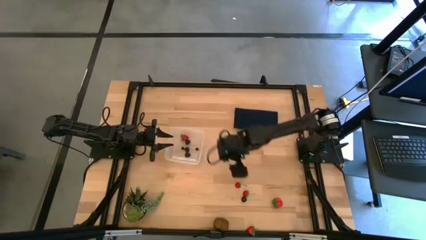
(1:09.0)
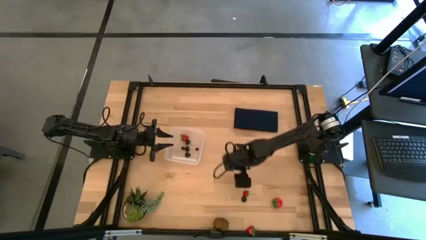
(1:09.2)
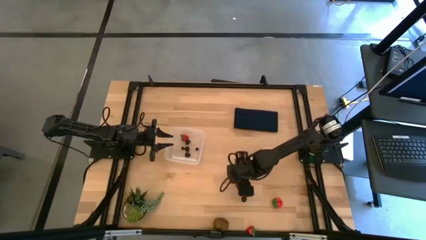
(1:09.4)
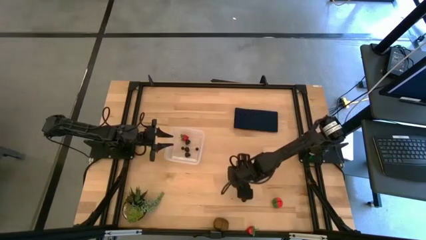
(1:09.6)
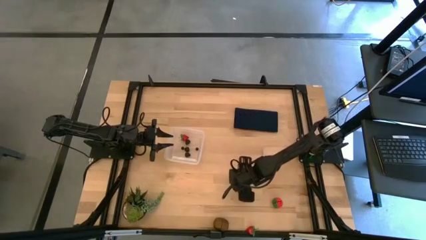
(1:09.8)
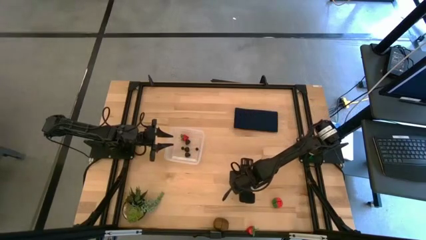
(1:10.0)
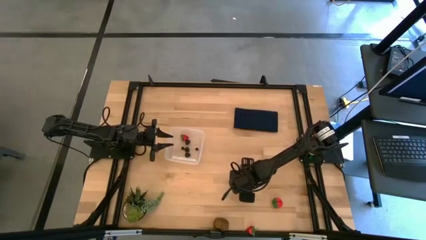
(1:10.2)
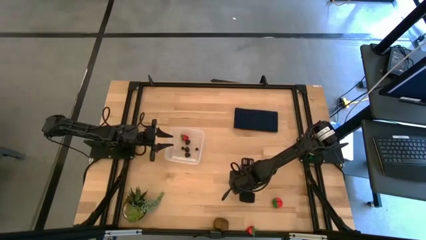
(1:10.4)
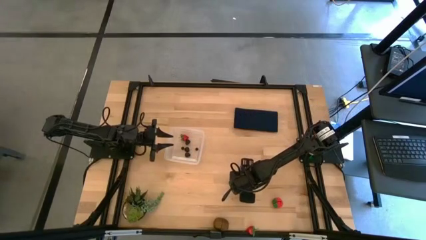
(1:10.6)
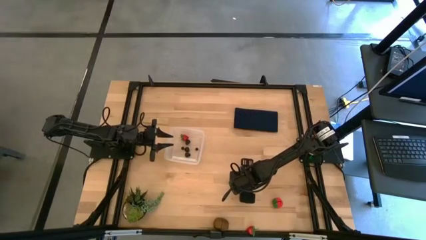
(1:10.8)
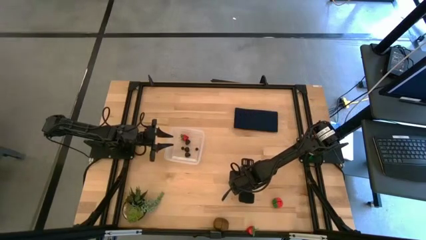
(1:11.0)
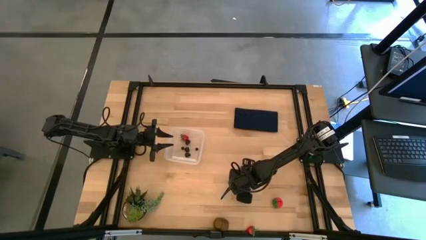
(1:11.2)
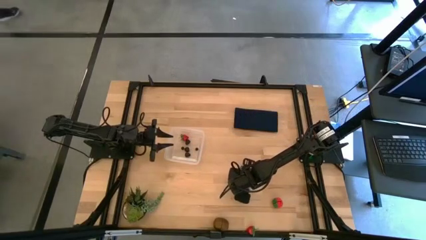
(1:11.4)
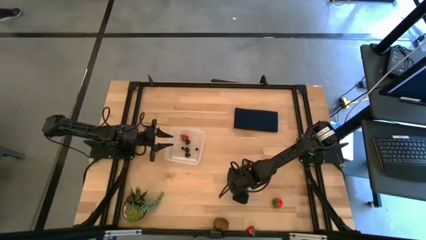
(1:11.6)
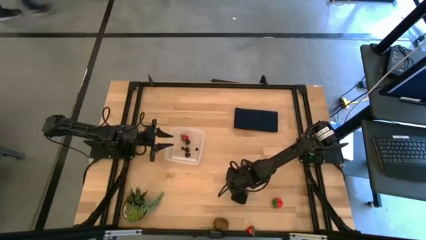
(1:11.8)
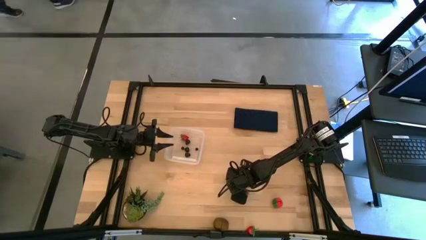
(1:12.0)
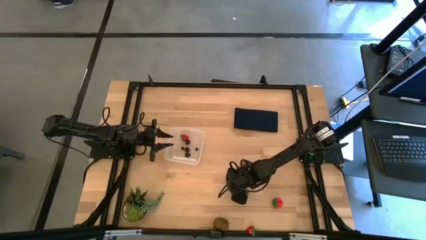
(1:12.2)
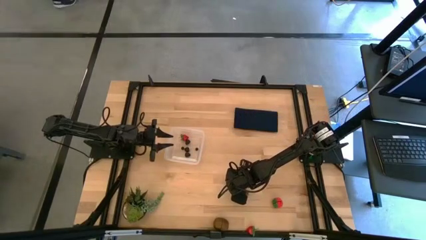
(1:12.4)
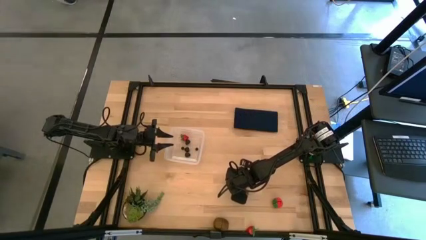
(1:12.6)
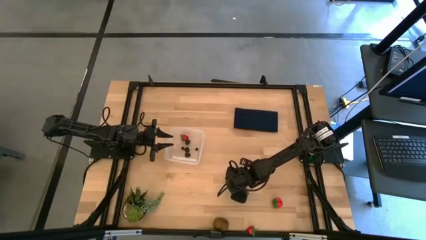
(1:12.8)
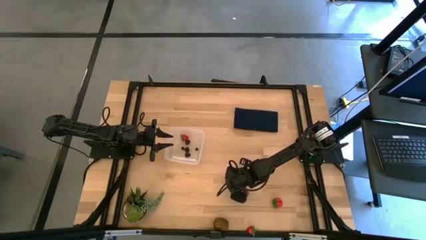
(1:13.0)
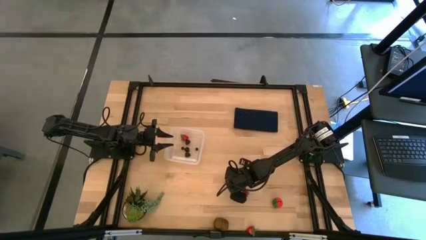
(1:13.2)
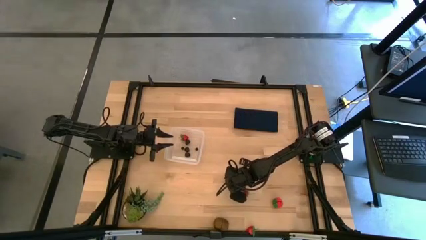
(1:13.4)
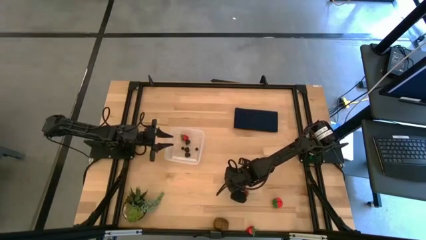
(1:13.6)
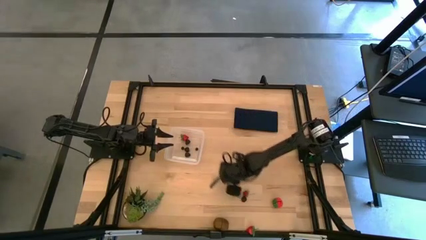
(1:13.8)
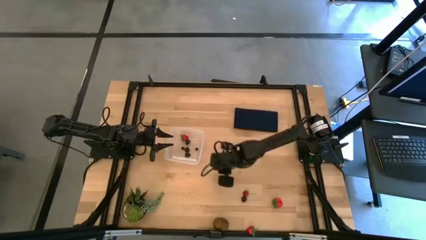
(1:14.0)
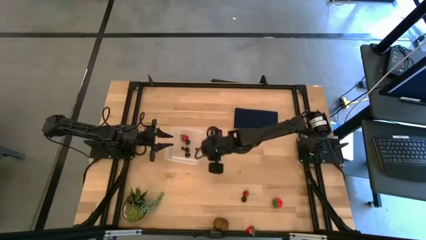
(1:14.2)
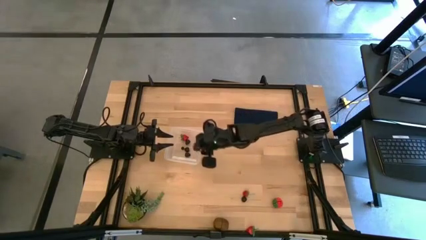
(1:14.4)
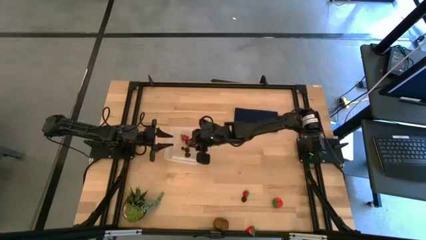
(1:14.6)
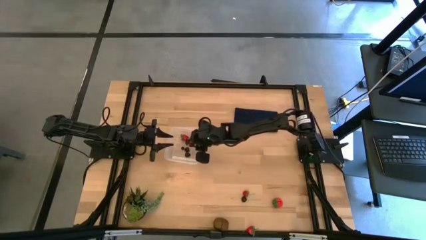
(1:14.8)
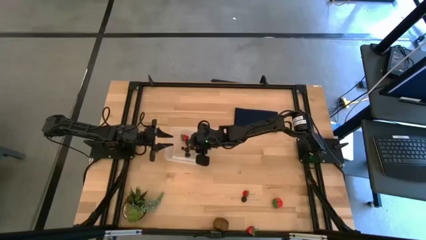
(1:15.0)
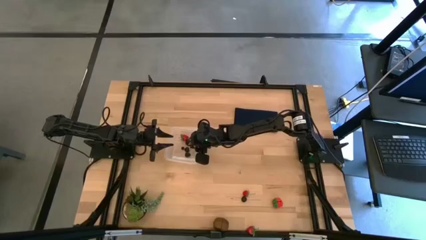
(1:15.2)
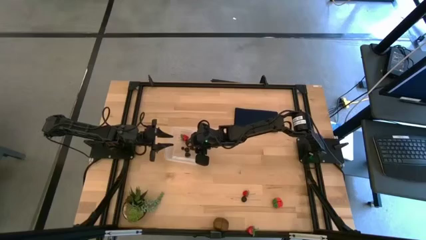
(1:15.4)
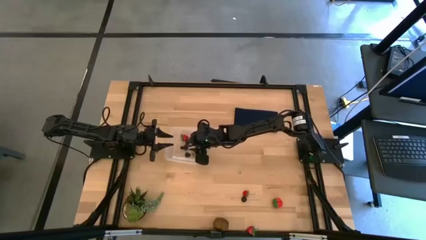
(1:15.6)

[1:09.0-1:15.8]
Task: Pick and placing Produce into tupperware
Put the top strawberry into the transparent bin

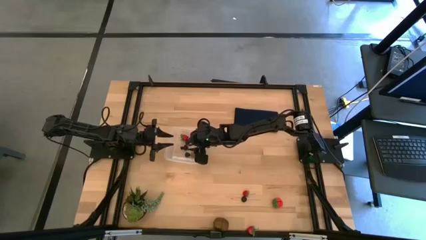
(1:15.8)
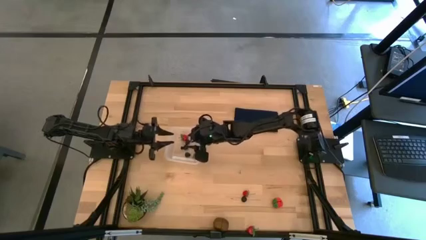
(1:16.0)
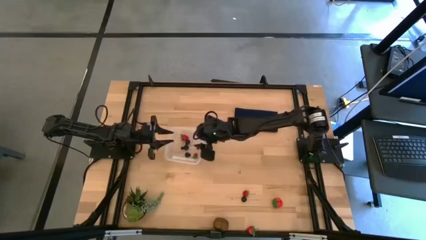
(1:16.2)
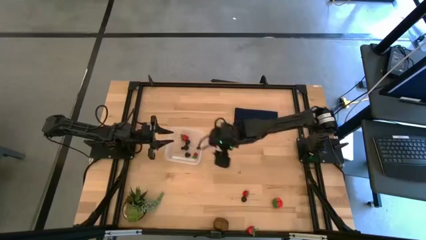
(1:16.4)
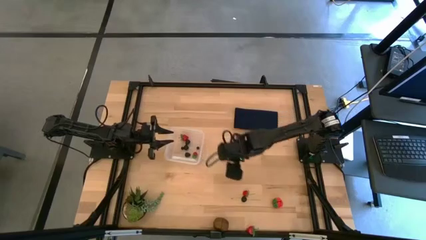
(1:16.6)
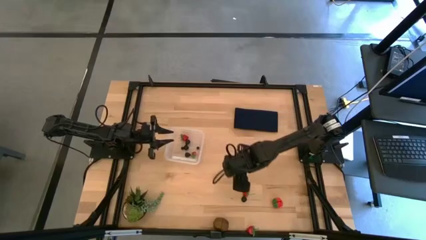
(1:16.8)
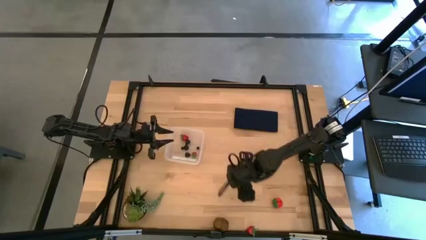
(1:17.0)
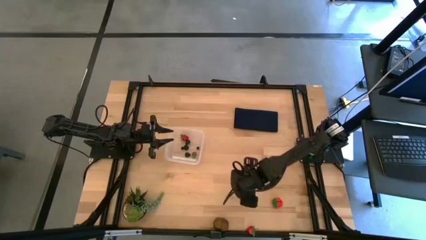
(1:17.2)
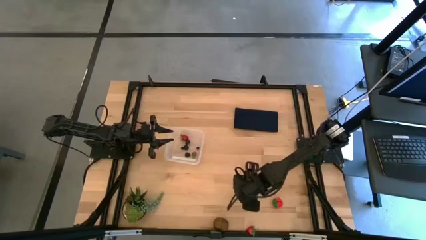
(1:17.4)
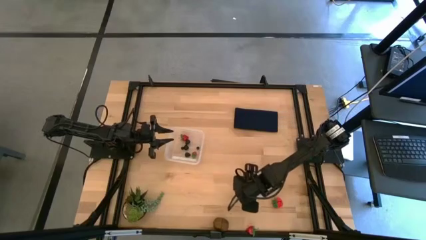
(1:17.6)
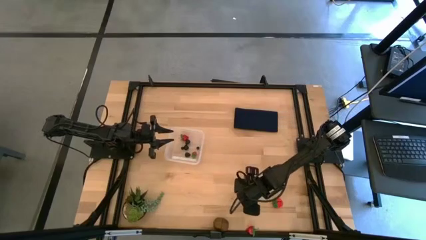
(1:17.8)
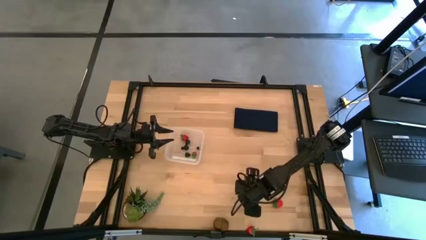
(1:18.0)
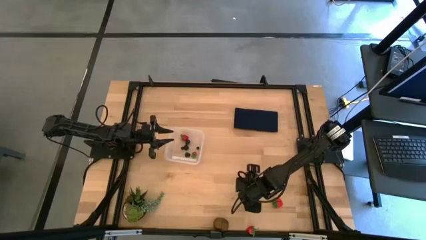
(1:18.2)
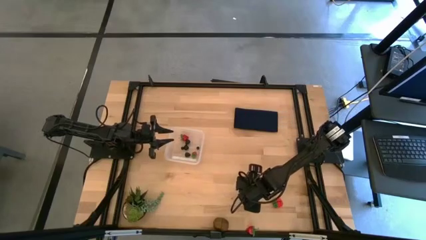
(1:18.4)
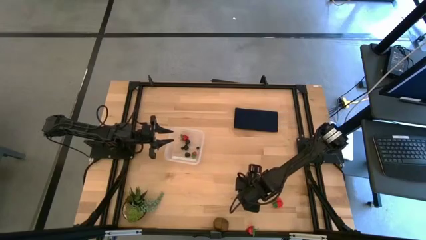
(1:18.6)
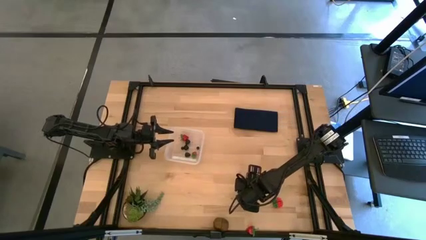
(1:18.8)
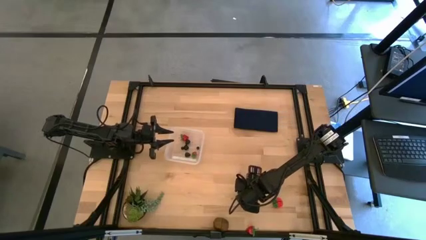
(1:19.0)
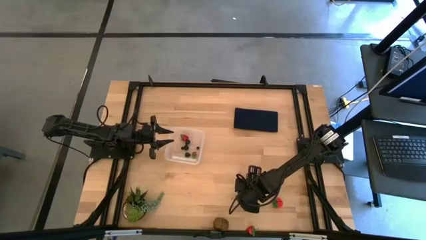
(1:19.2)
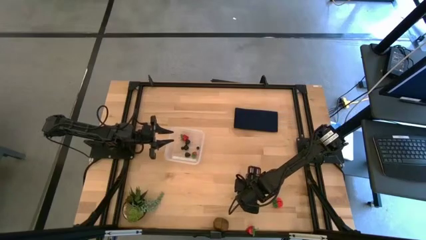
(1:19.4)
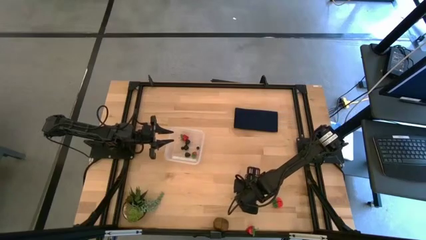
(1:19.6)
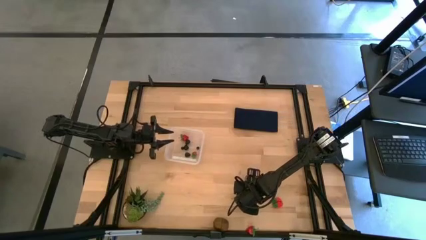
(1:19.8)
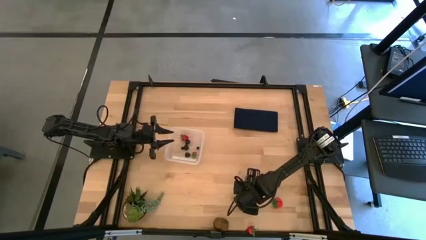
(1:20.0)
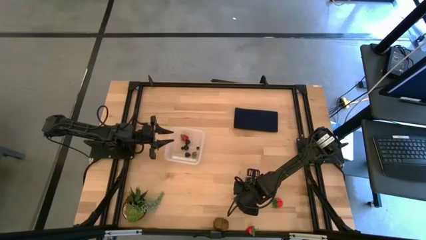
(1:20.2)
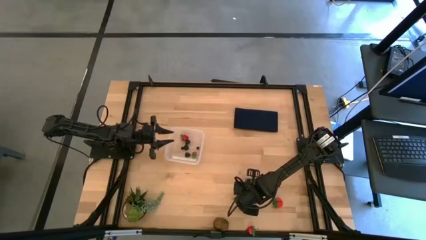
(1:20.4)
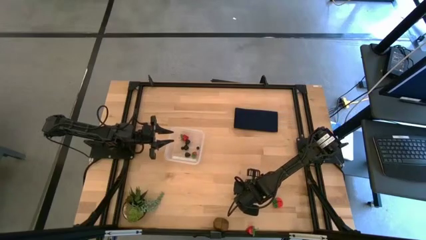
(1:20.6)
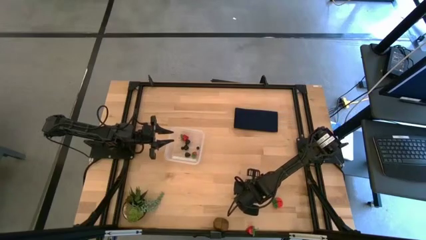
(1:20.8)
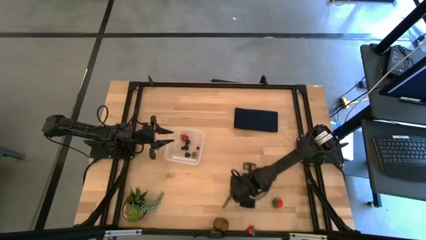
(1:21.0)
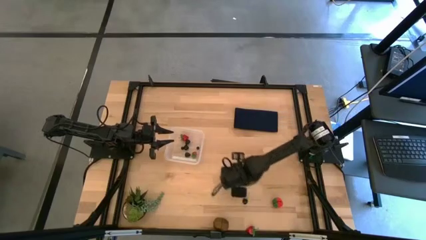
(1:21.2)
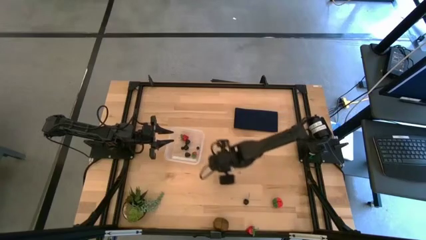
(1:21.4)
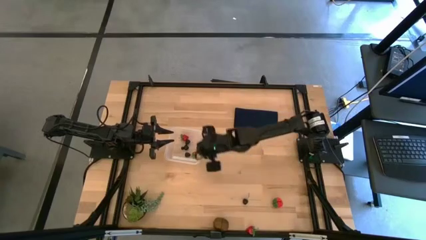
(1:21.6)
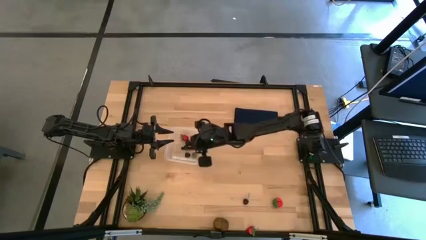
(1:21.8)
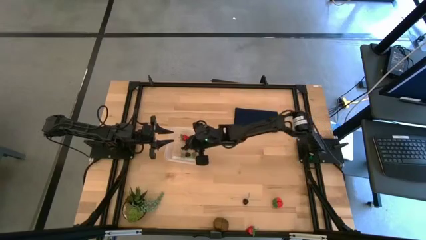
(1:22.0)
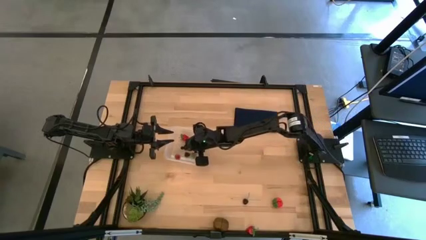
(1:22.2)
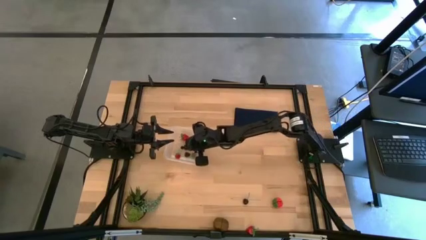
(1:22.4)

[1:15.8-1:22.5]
Put the left strawberry into the transparent bin

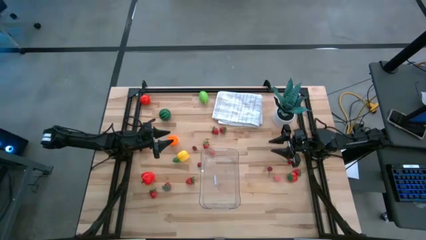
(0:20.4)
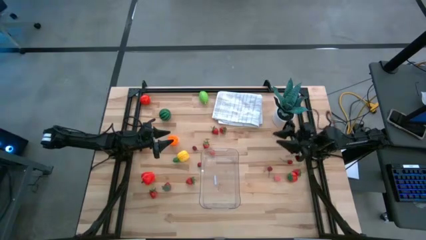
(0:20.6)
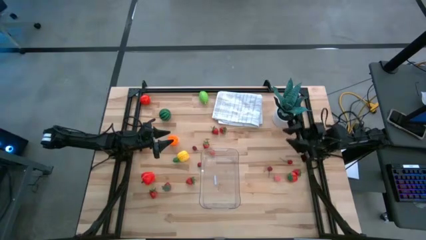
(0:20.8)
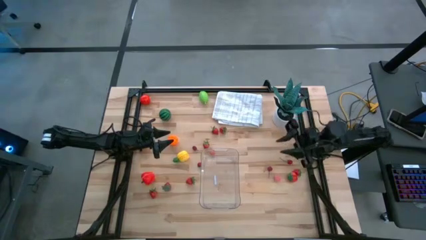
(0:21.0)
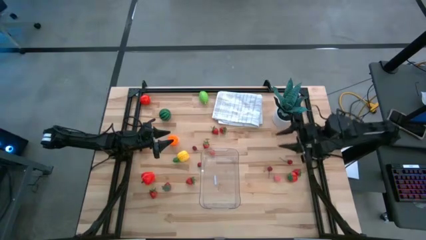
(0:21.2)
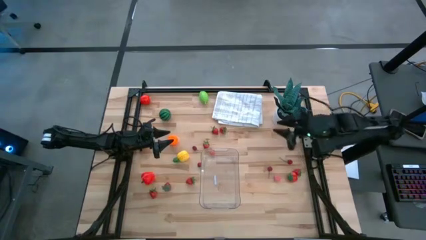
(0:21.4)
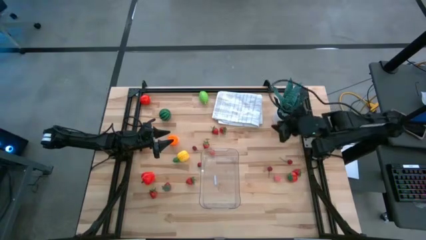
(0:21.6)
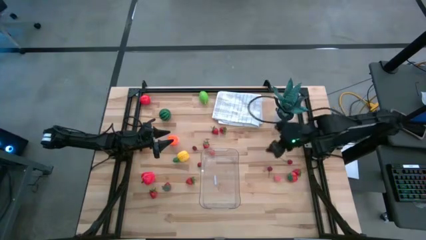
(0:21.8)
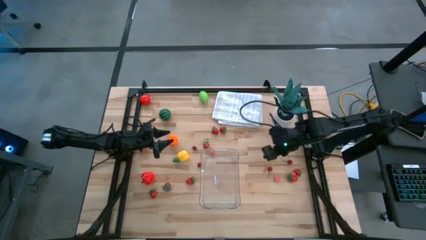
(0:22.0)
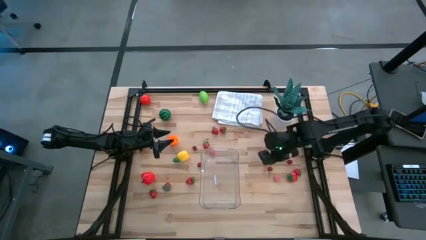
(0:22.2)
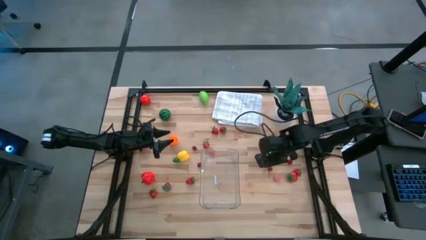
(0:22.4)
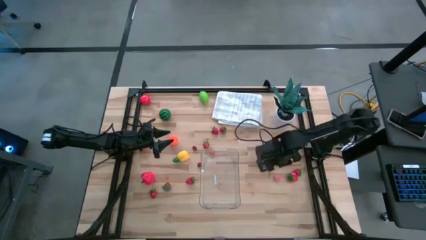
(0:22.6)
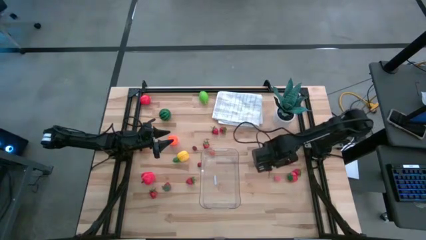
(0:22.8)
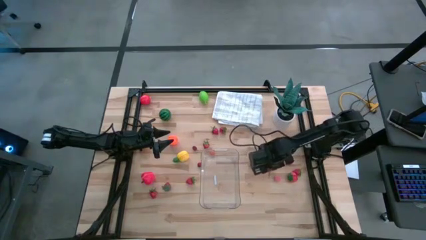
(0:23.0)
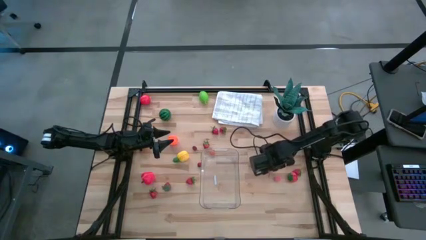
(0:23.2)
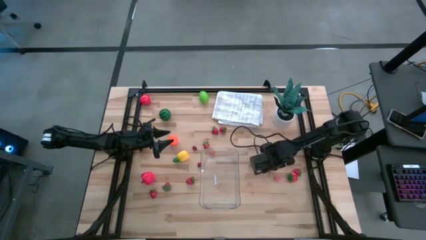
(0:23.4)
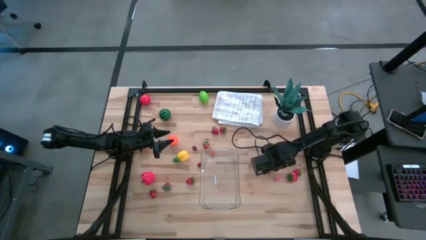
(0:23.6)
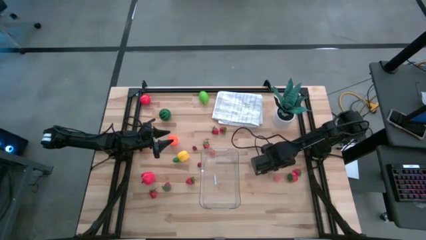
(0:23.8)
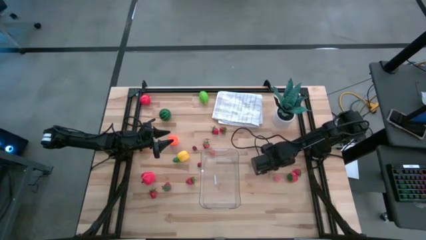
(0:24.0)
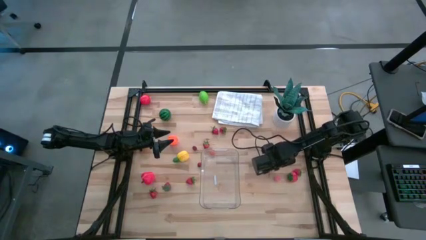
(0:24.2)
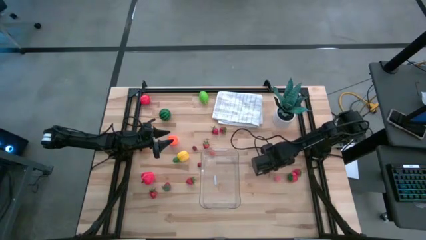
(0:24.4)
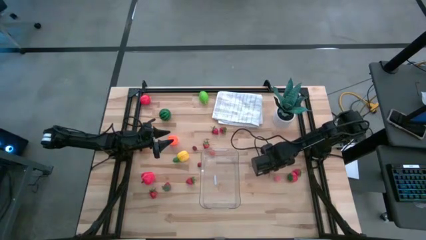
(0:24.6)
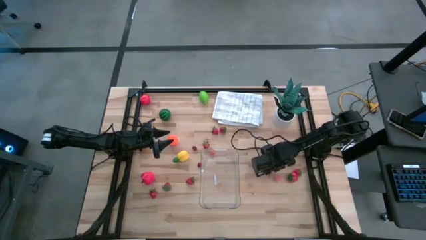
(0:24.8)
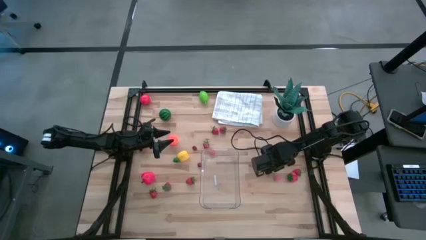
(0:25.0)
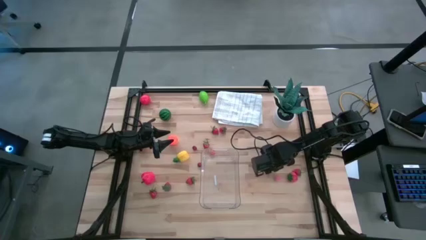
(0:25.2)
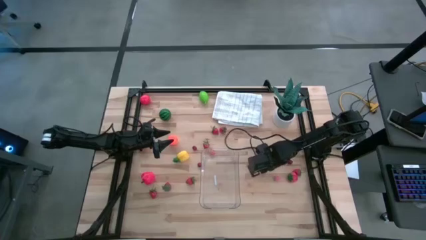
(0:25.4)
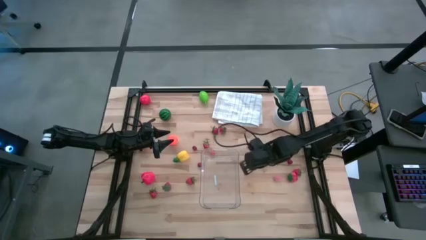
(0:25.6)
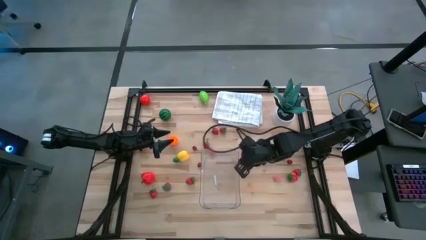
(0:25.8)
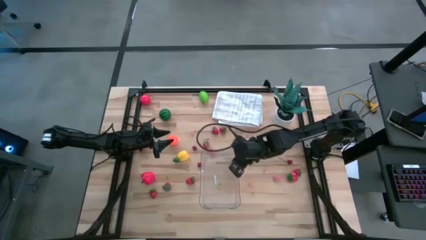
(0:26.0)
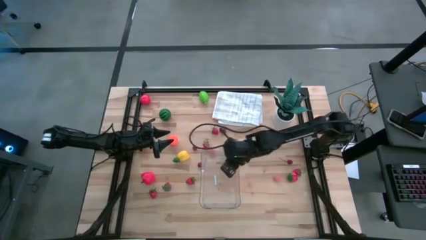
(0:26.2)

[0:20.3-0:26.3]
Task: Pick and placing Produce into tupperware
Put the red cherry into the transparent bin
